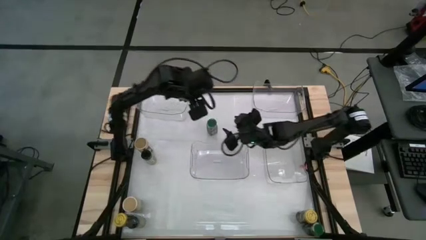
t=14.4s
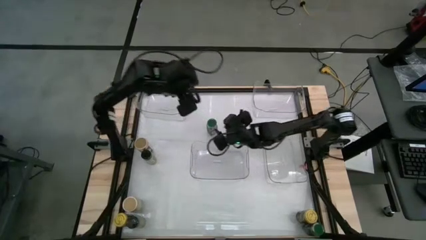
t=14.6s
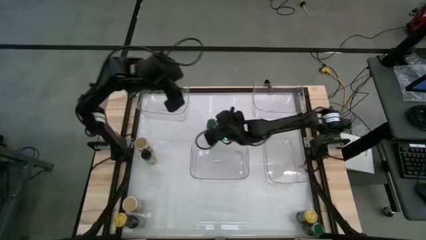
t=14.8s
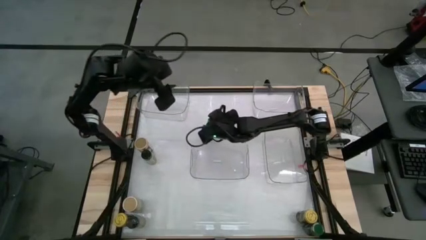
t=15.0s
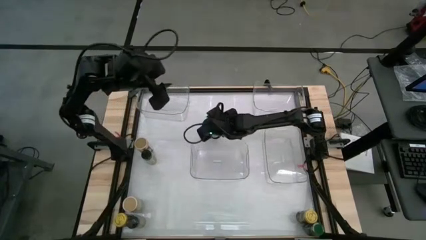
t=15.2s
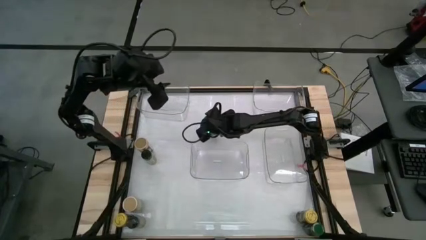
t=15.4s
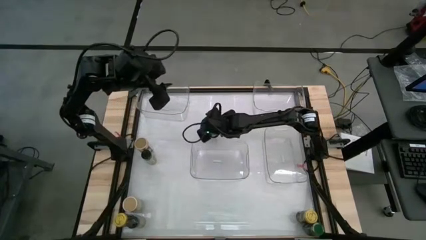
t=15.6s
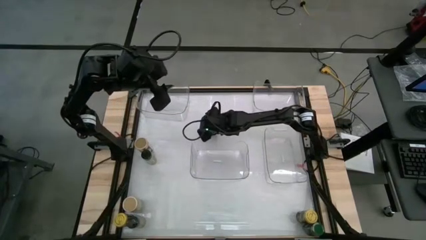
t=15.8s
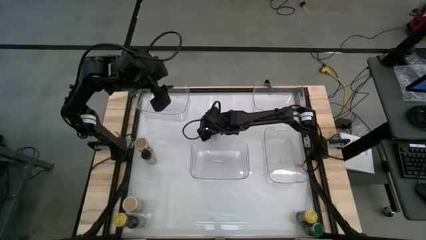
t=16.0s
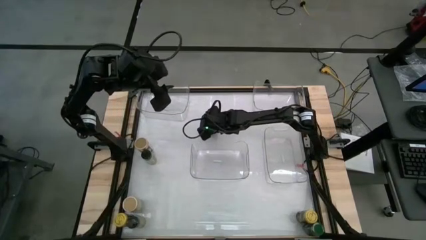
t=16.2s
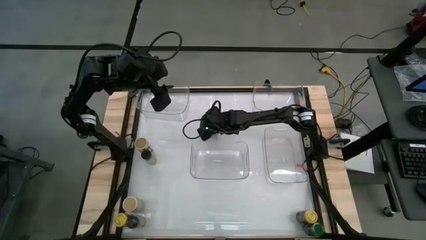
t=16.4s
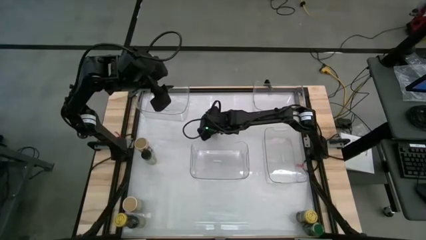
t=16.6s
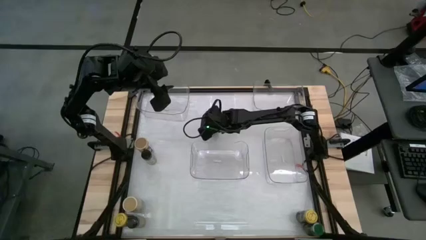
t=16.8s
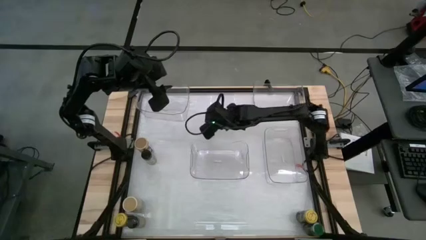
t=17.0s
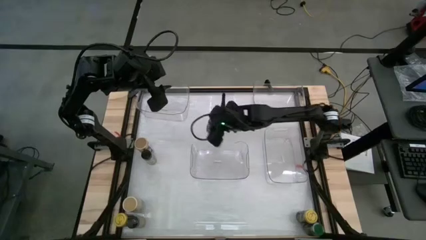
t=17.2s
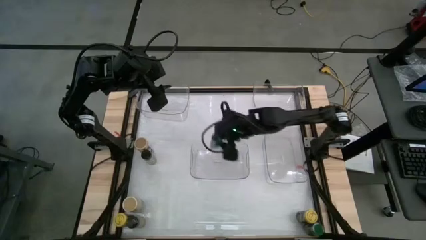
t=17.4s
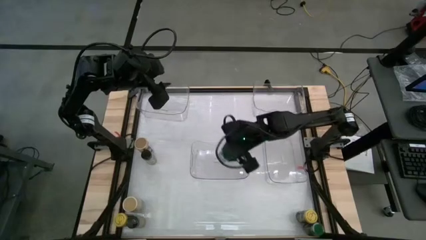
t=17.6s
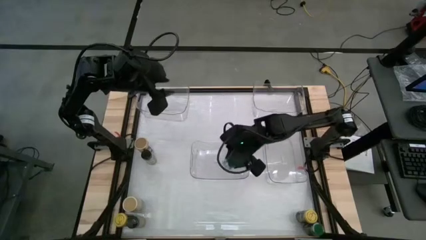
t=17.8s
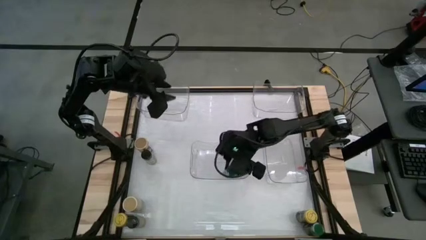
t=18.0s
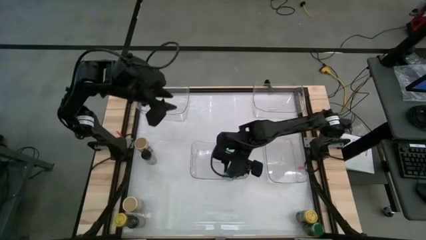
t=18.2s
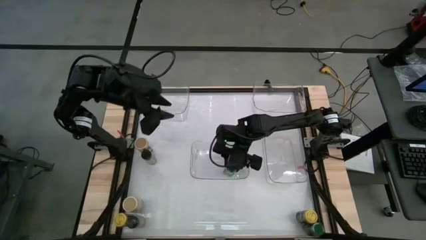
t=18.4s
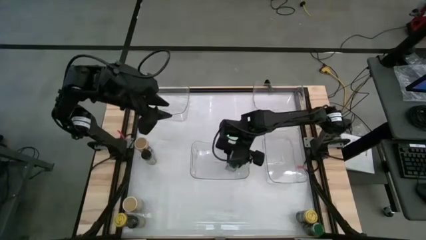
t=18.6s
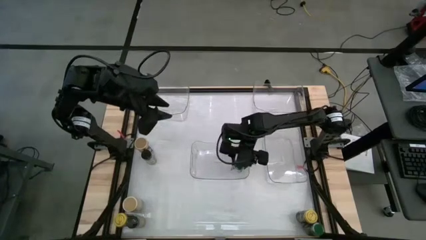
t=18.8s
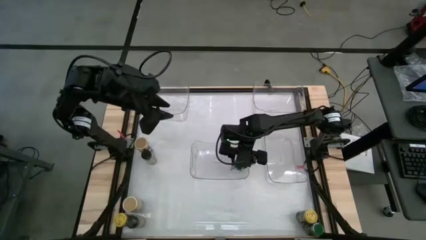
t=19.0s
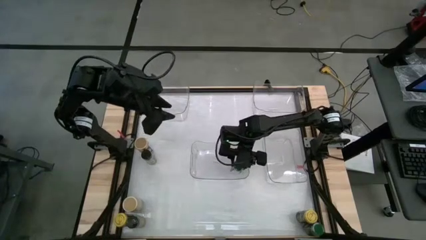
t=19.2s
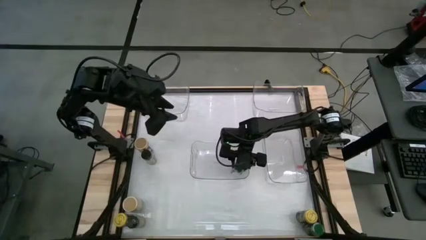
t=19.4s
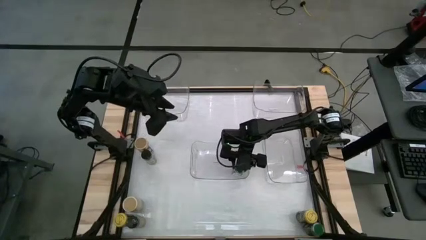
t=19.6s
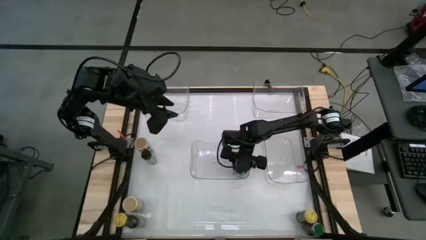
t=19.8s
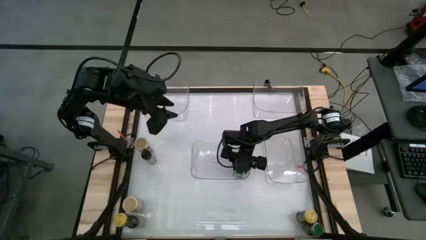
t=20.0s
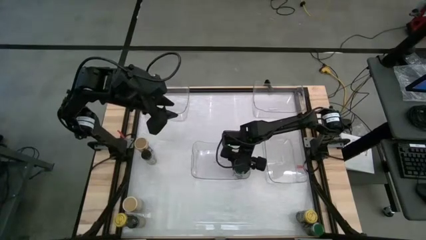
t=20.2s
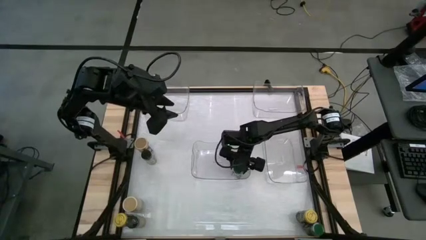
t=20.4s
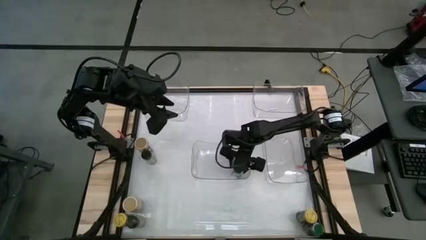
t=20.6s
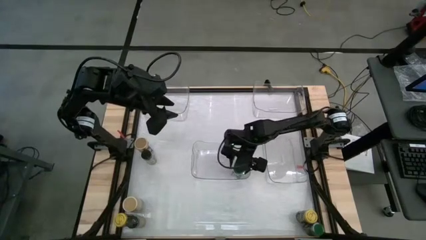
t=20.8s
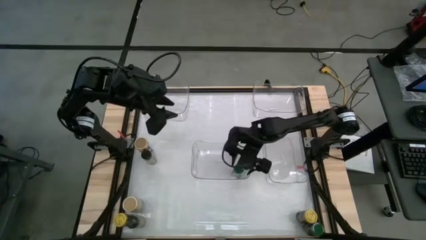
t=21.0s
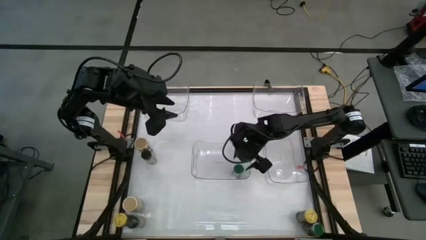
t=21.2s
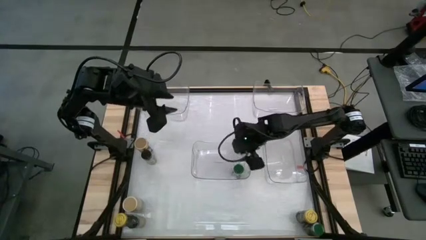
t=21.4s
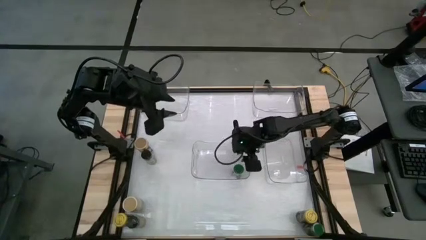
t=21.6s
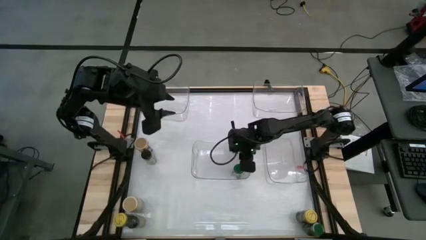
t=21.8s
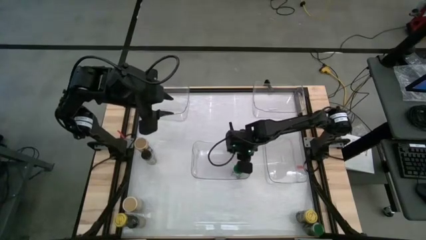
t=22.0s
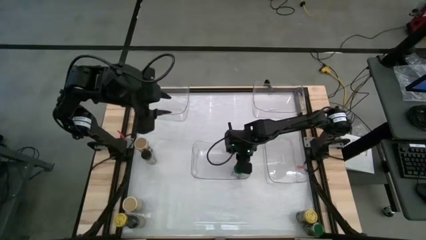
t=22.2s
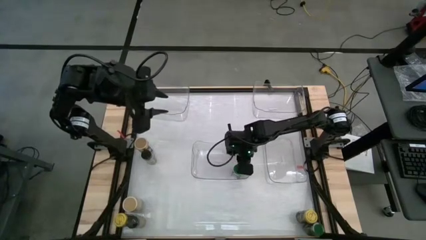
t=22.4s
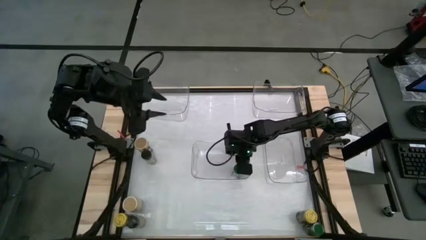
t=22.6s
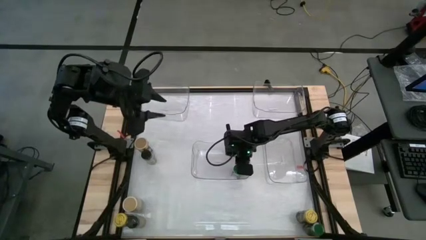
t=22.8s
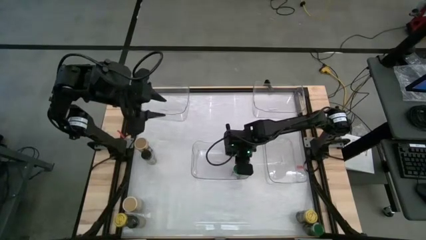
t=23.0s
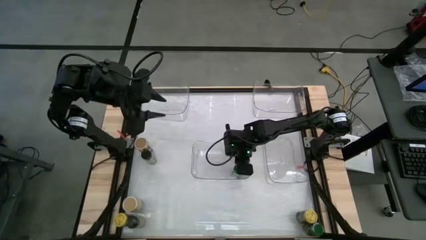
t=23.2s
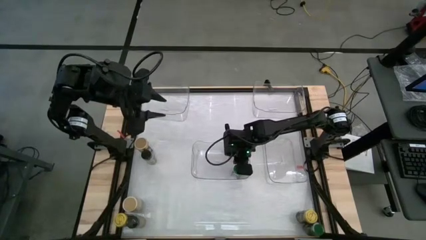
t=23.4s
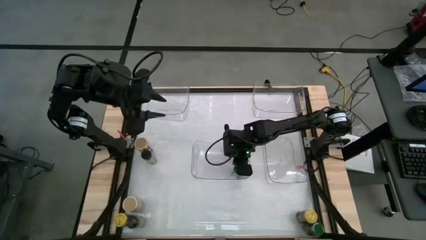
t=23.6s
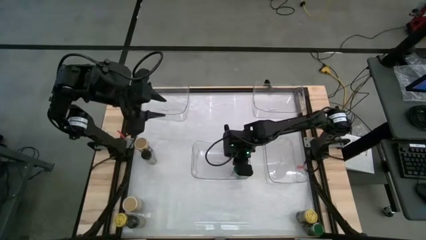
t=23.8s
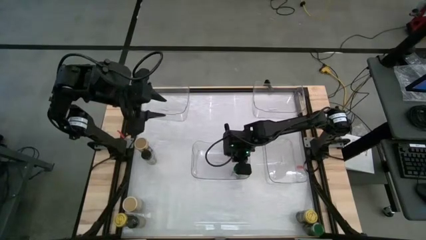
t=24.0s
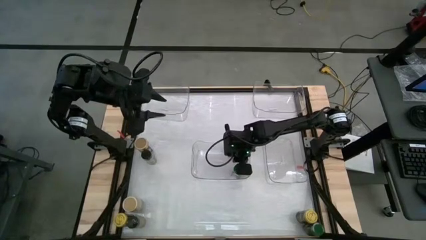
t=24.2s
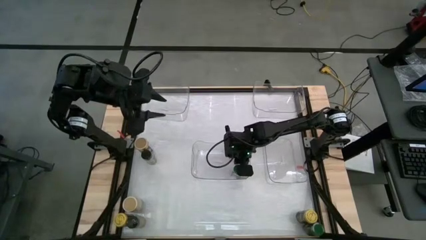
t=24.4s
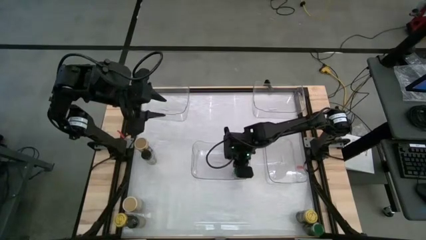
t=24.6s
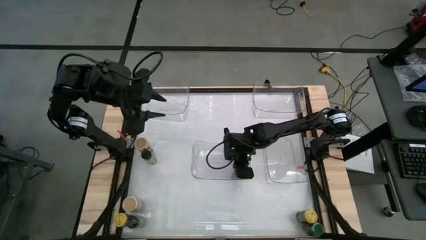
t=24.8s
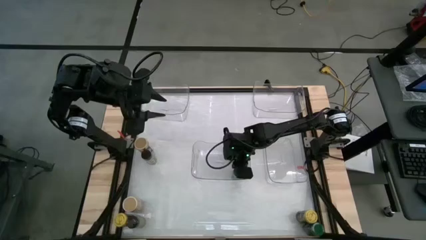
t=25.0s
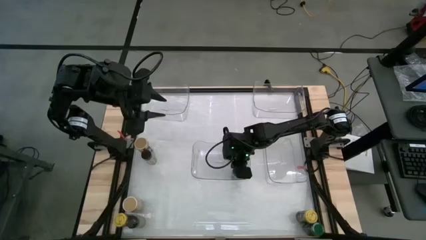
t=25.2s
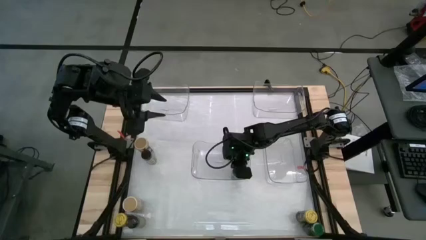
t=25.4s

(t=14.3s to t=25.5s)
Task: Sort spices by type
Put the top green seasoning bottle into the bottom left transparent bin

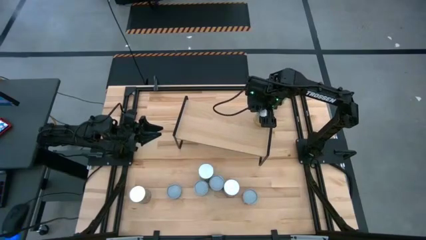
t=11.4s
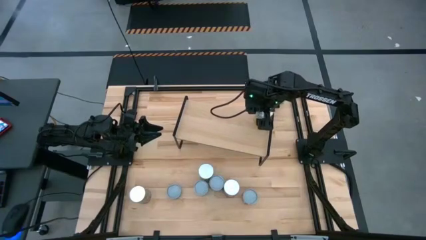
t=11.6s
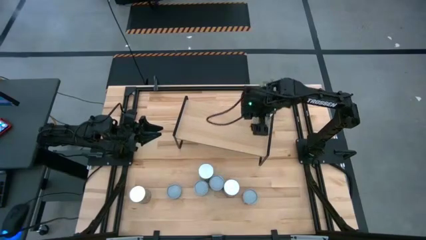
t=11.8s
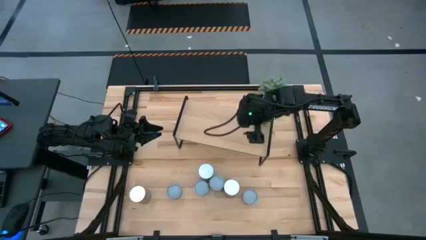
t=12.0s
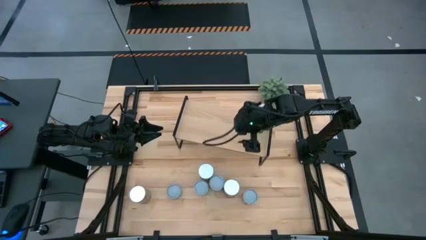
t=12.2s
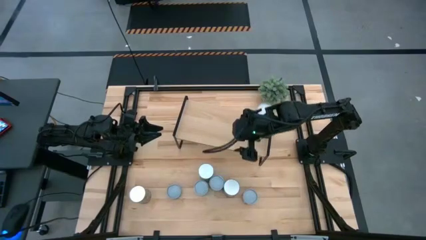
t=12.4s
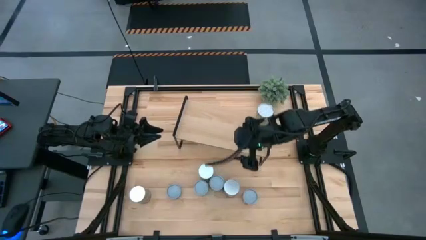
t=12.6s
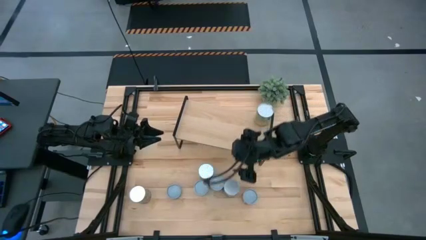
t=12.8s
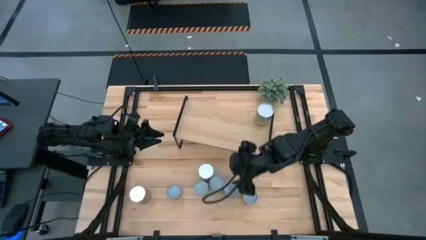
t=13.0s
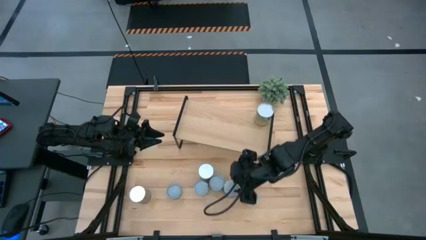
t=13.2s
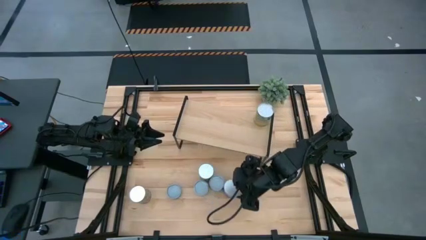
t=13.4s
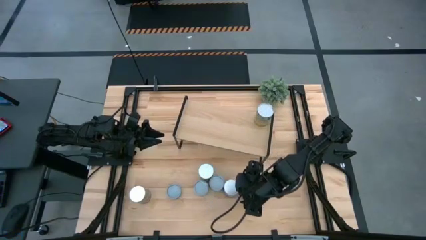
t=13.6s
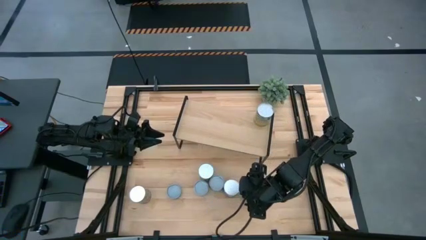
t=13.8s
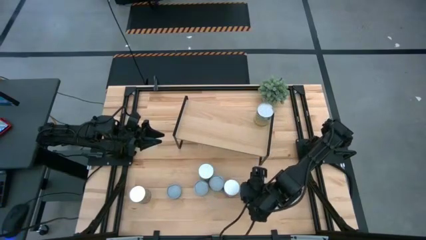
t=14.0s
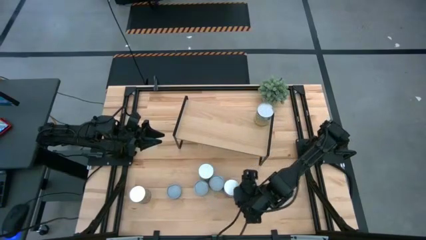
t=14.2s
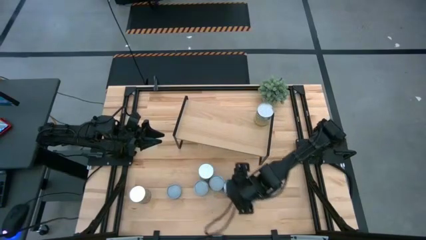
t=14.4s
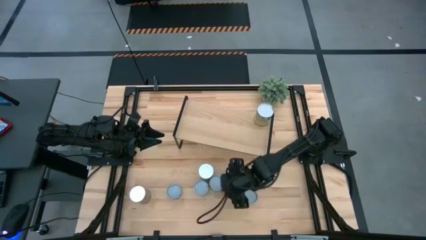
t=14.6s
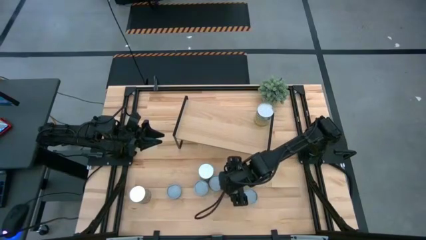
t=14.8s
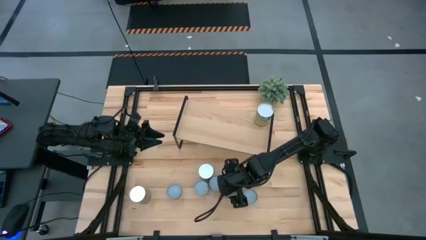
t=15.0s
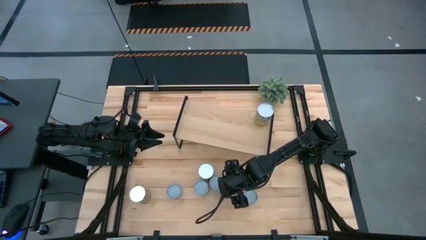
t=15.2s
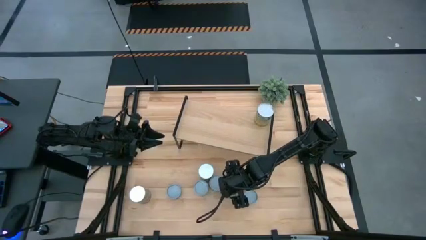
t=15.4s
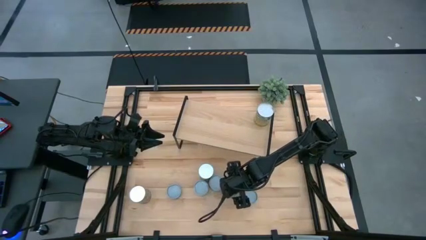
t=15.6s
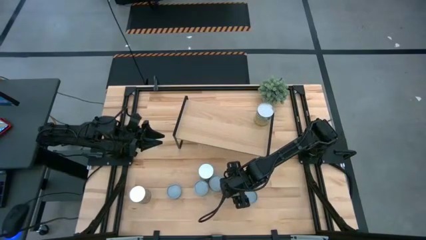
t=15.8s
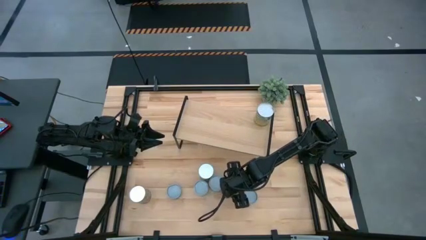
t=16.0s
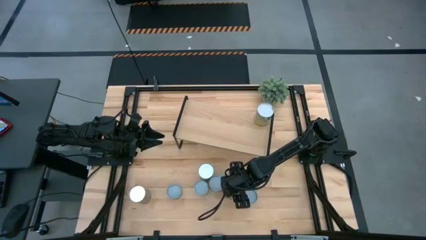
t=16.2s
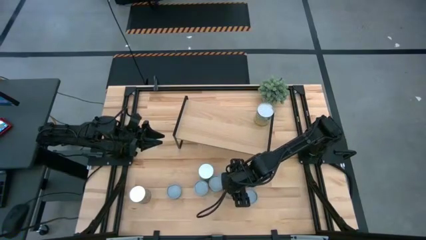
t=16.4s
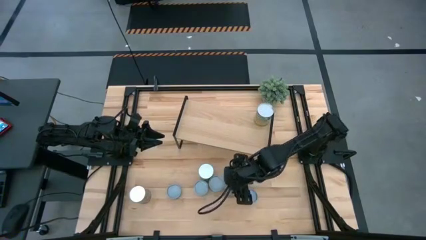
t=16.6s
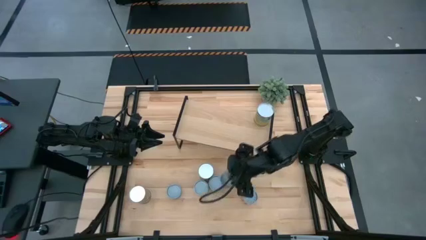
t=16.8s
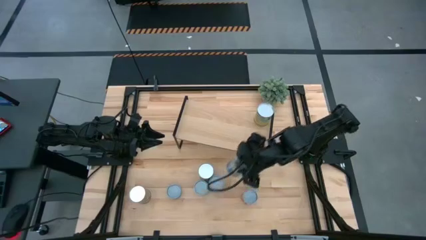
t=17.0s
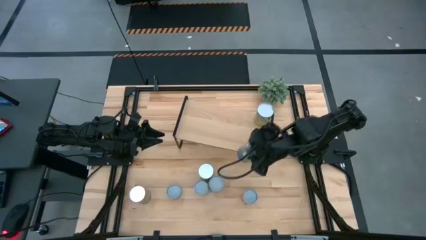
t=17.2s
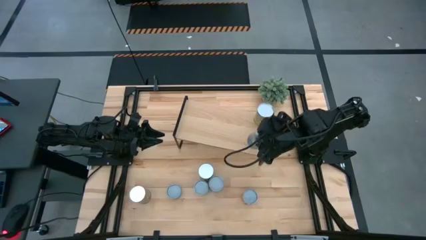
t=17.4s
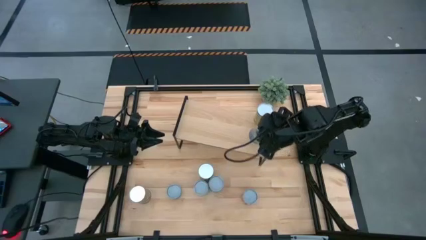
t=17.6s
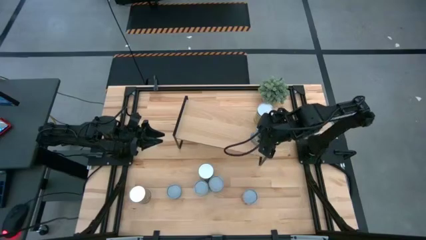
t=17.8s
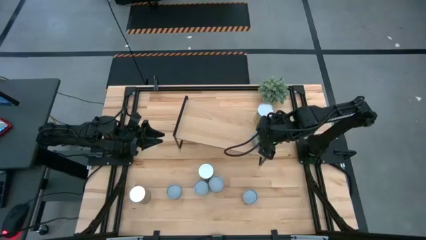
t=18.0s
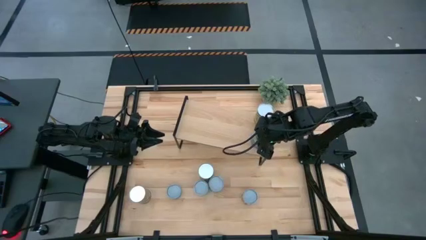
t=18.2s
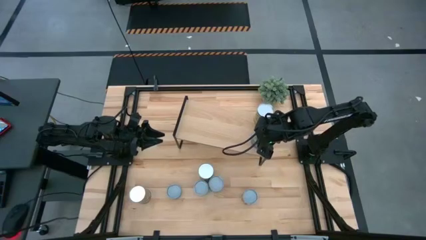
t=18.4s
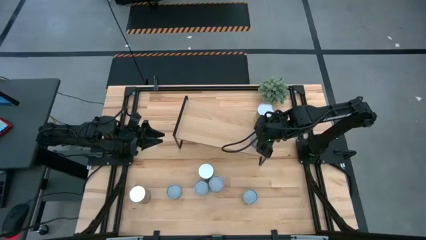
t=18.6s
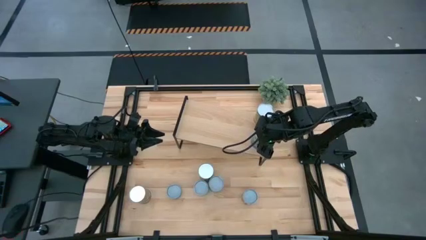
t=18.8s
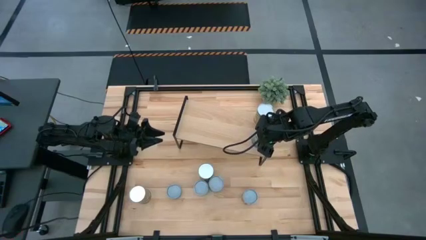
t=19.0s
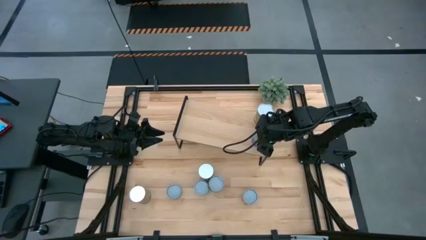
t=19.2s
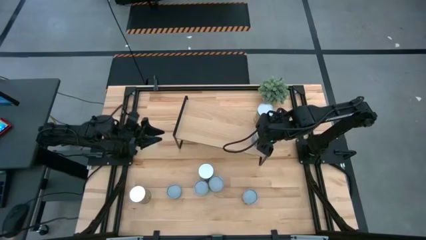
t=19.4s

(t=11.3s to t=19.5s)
Task: Pick and place cans onto a shelf
Put the canned peas on the shelf
